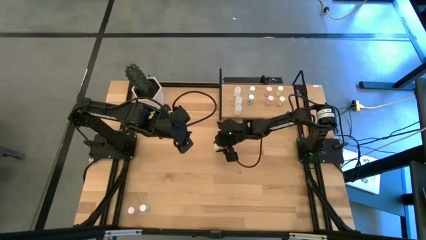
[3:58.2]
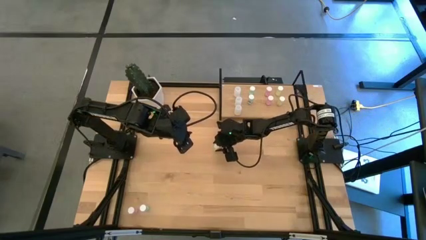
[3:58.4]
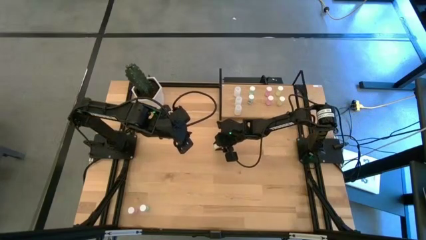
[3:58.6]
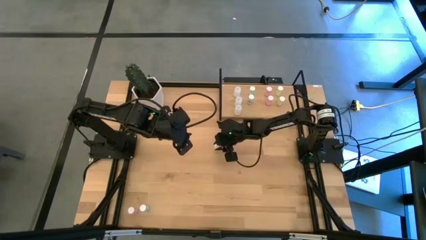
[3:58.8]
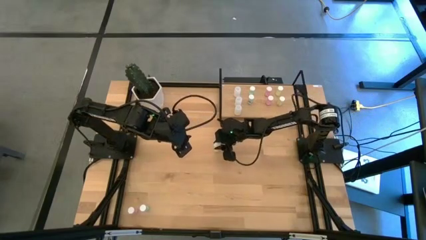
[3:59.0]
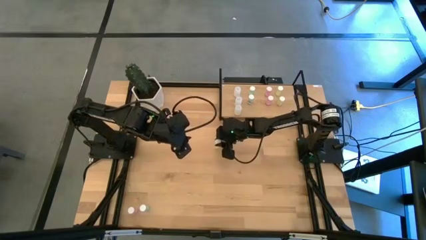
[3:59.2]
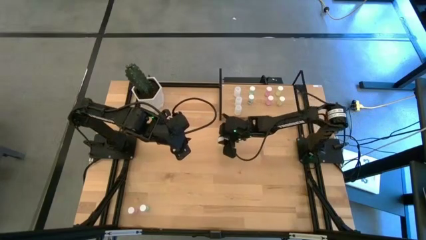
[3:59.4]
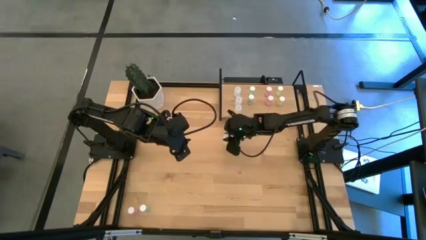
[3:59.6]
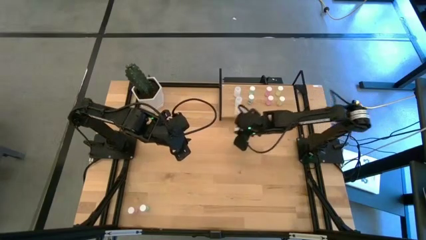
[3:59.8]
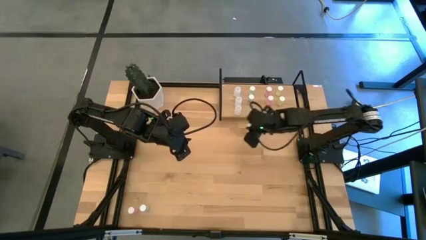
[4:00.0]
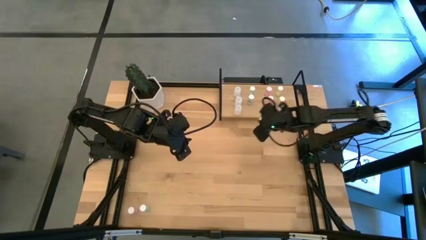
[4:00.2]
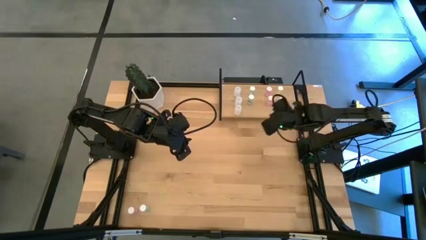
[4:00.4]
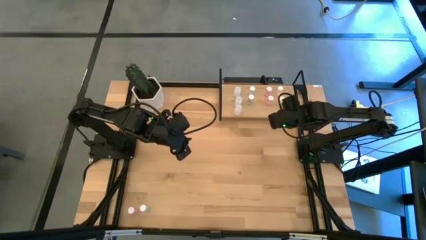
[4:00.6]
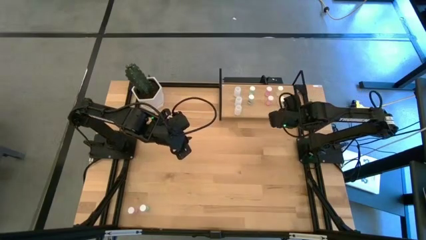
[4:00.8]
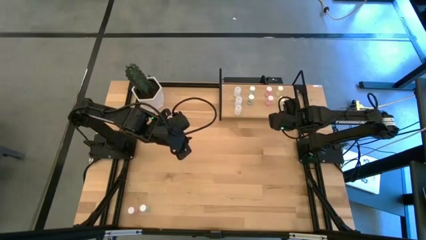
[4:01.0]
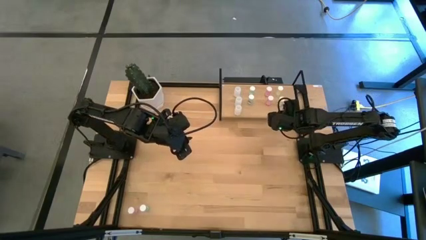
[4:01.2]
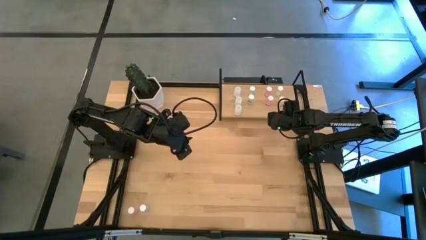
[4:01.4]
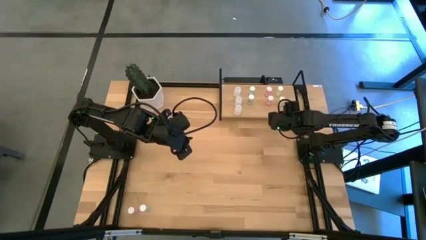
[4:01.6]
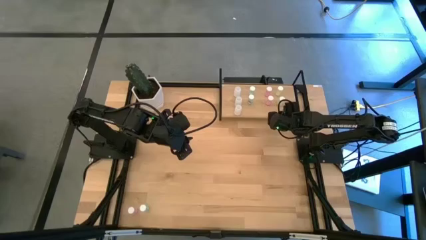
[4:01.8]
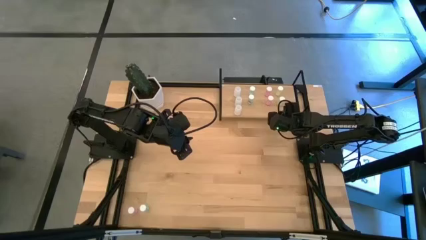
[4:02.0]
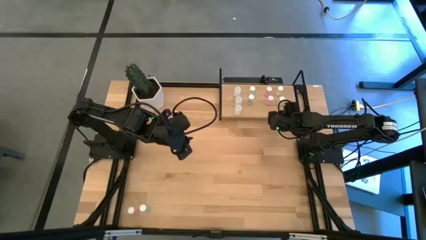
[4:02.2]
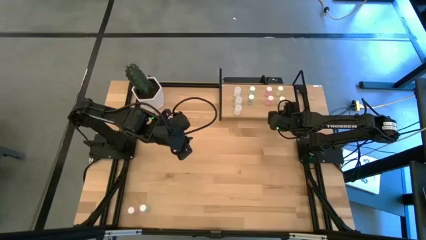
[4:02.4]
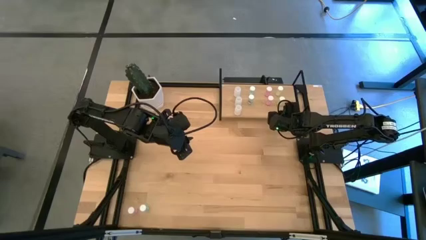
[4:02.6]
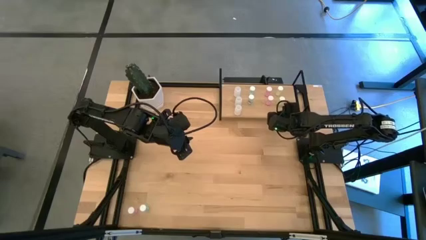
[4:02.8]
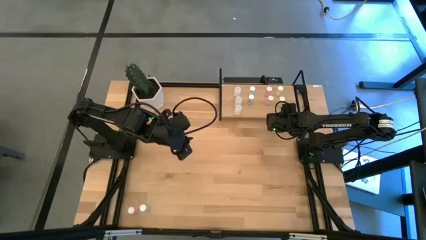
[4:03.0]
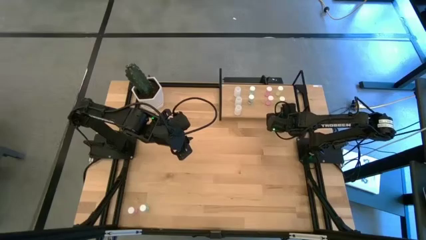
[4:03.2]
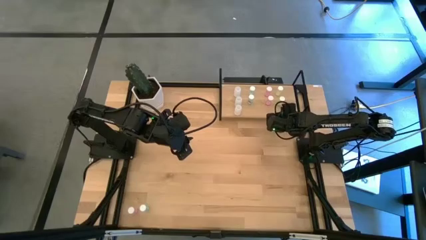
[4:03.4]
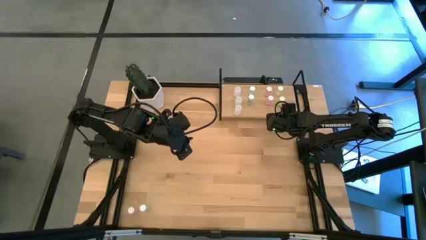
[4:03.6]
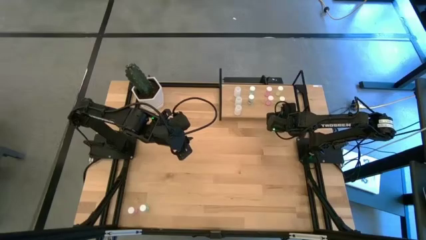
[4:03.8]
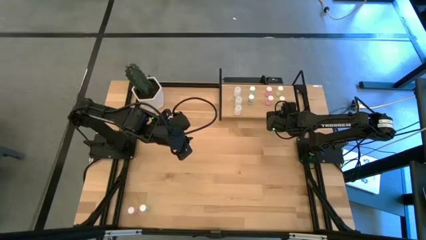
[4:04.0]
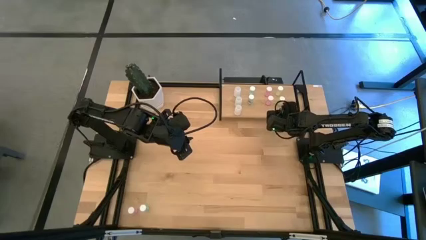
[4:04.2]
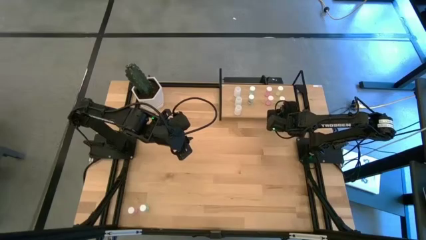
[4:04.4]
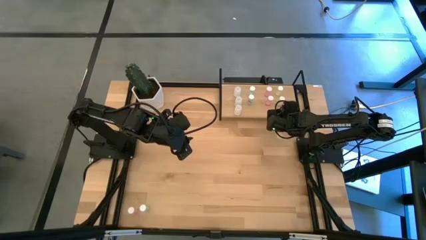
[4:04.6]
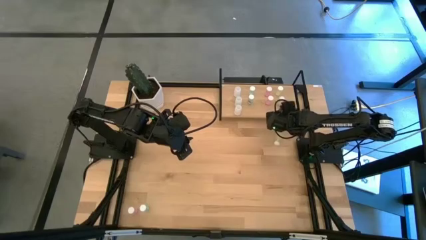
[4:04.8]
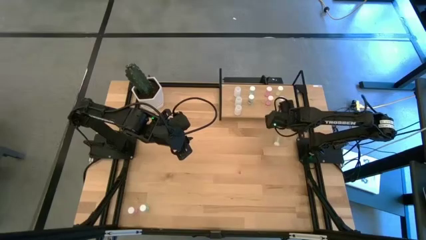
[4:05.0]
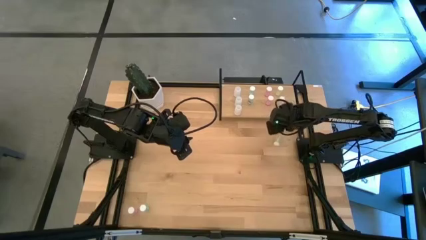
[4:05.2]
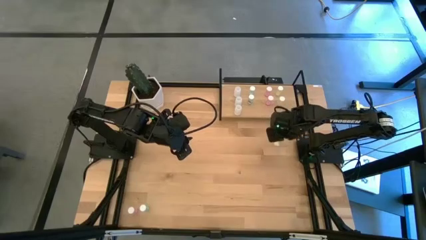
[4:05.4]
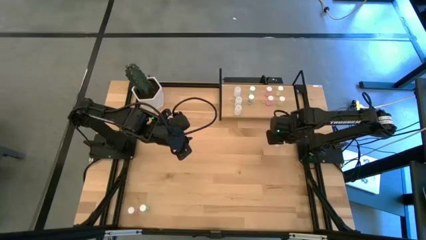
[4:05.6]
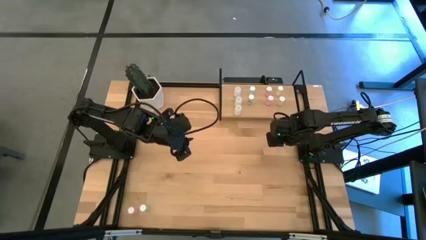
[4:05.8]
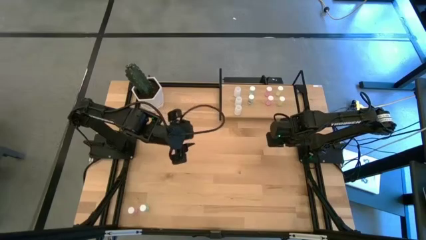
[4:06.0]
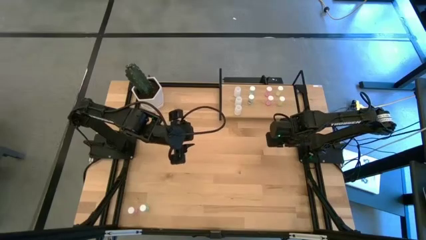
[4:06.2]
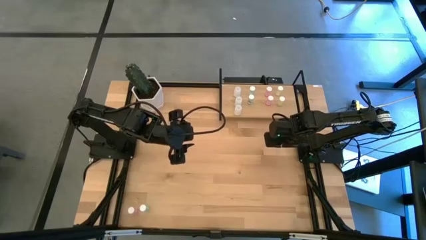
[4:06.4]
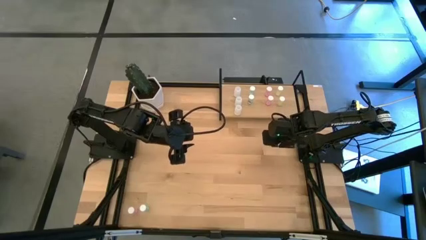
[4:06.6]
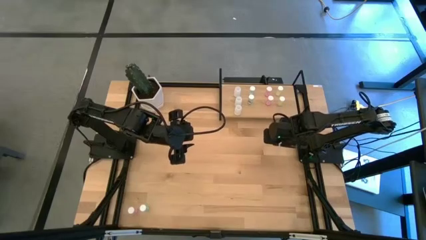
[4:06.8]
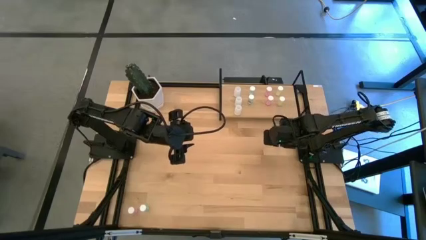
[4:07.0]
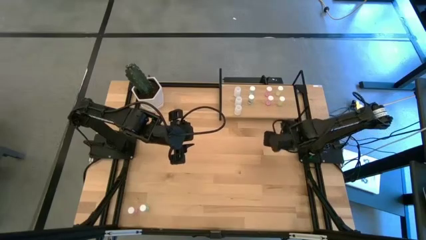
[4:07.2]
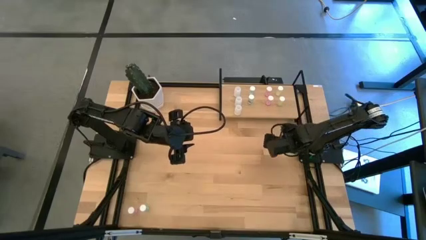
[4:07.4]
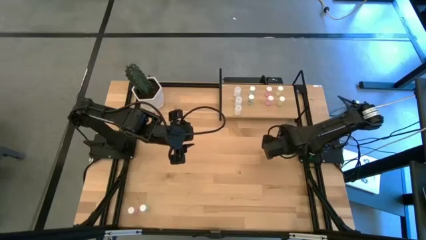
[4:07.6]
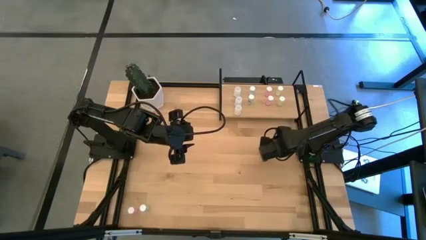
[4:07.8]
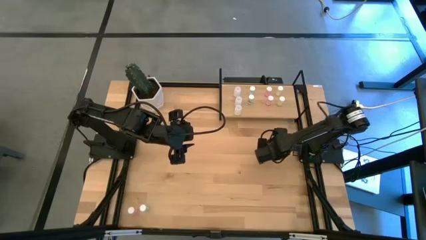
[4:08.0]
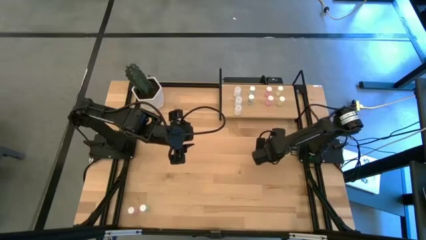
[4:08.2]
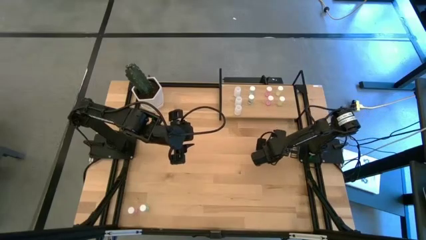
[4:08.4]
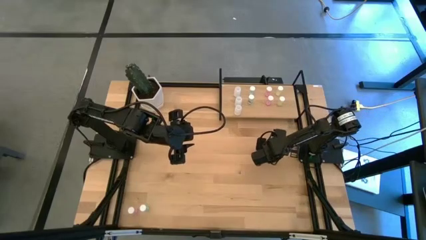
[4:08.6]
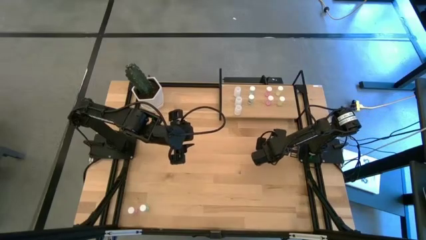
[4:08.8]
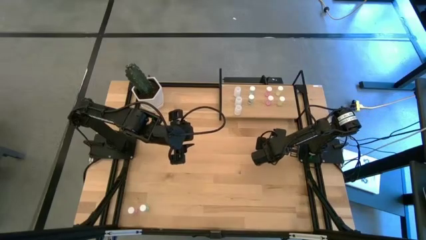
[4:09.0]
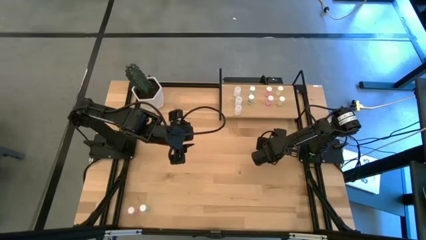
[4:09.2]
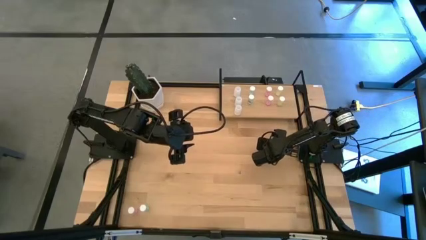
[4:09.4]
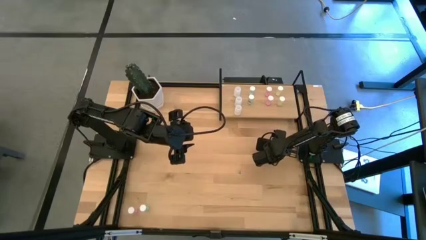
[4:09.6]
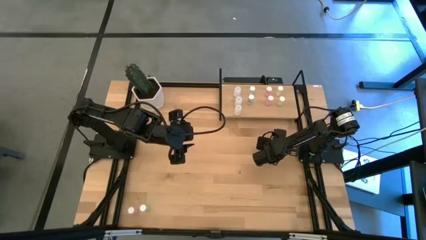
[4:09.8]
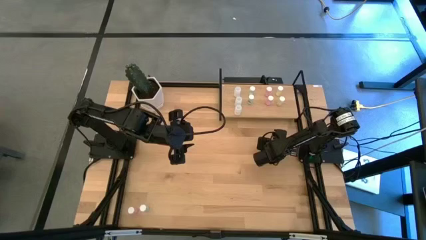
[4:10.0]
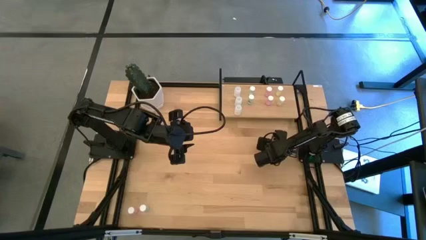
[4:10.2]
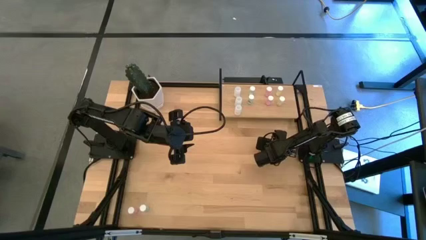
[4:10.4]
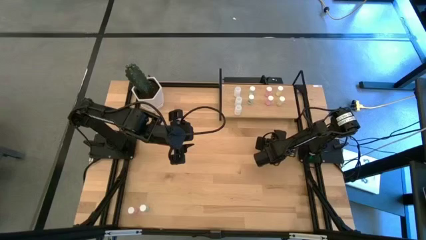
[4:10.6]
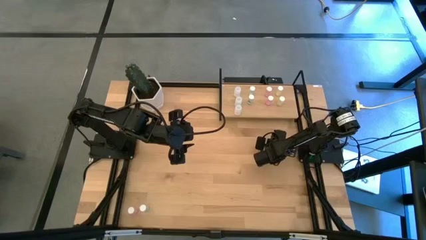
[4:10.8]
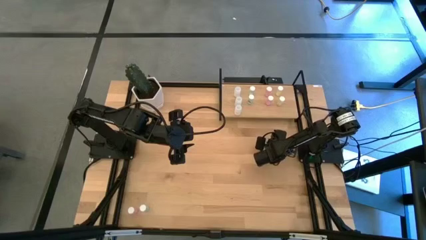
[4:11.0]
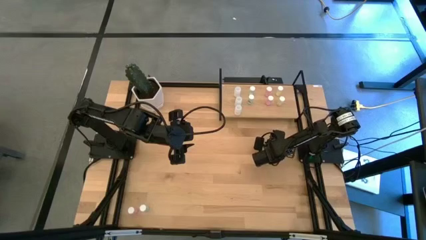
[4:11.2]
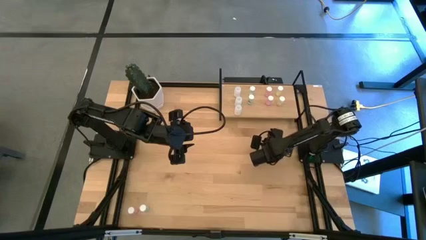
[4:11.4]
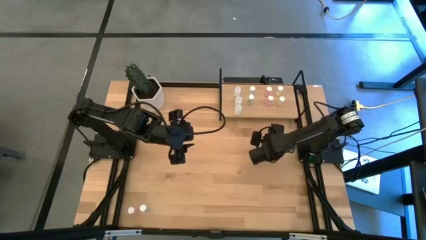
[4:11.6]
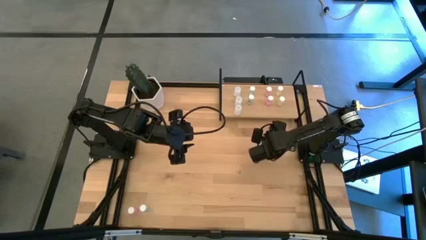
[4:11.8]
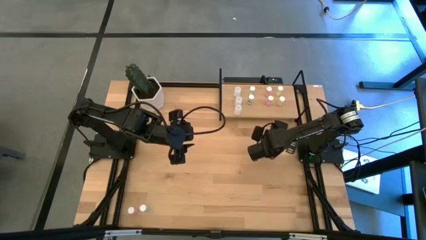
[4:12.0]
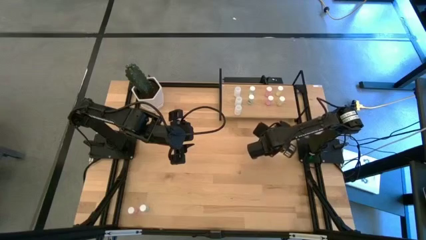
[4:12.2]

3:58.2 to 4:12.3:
Task: Pick and place medicine bottles onto shelf by color
Put the yellow pill bottle on the shelf aligned with the other yellow pill bottles

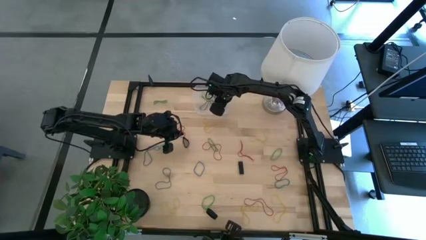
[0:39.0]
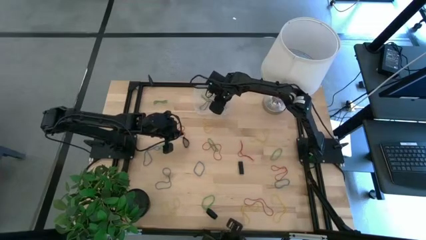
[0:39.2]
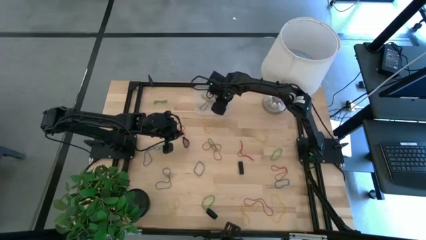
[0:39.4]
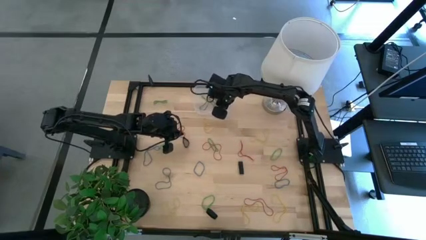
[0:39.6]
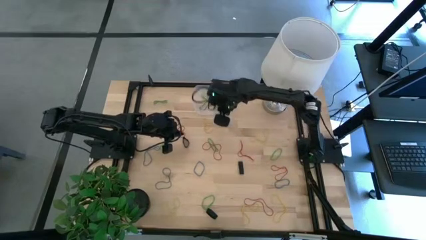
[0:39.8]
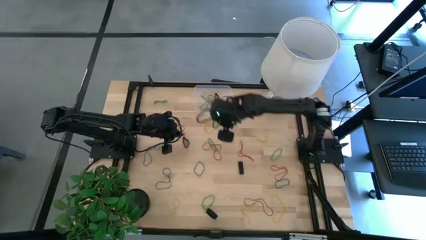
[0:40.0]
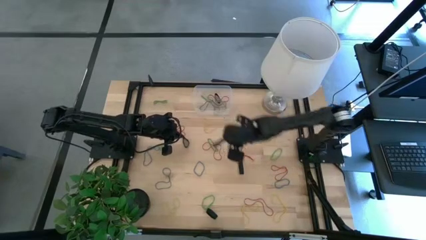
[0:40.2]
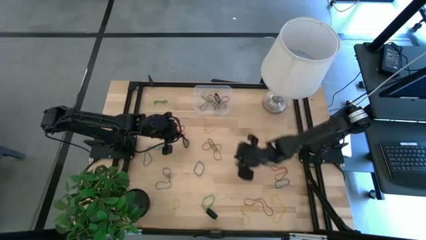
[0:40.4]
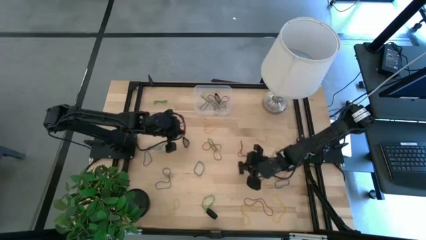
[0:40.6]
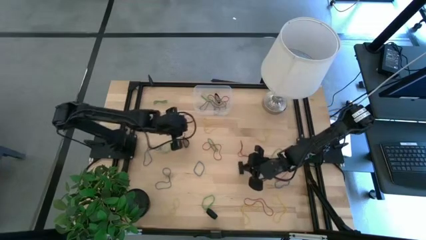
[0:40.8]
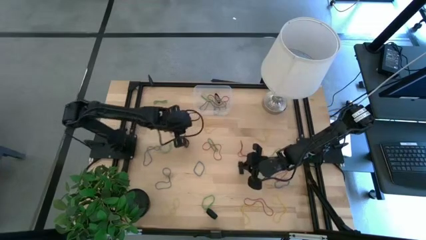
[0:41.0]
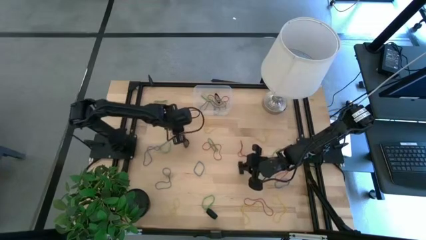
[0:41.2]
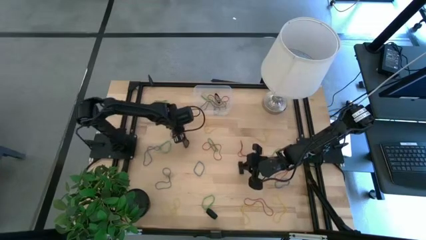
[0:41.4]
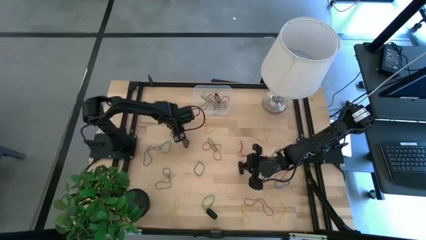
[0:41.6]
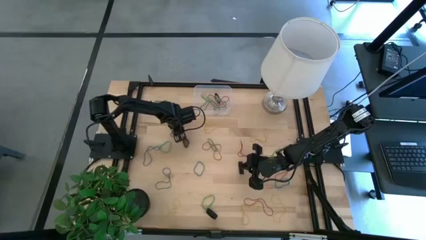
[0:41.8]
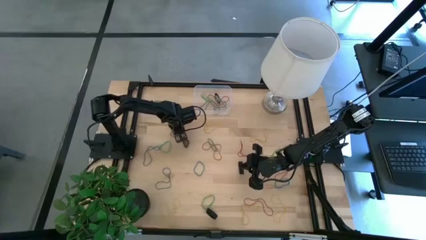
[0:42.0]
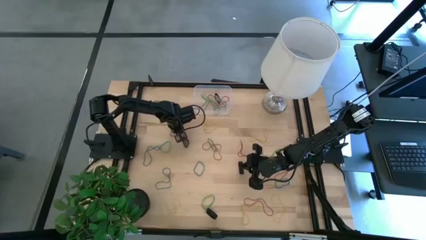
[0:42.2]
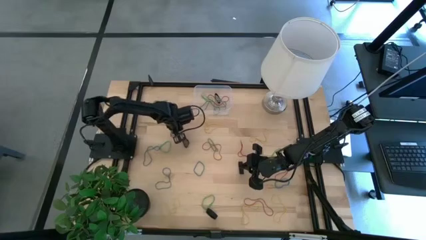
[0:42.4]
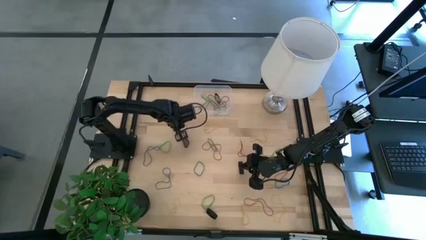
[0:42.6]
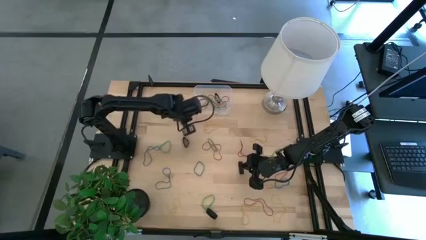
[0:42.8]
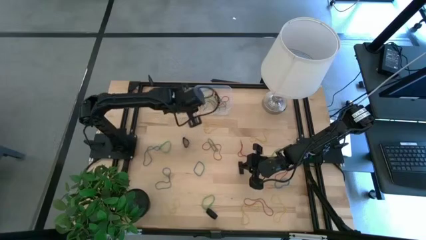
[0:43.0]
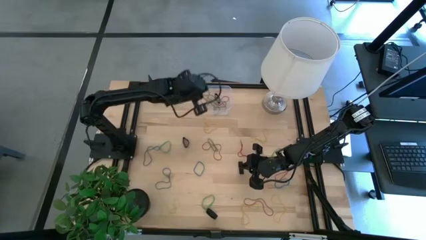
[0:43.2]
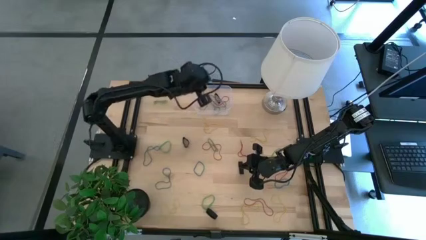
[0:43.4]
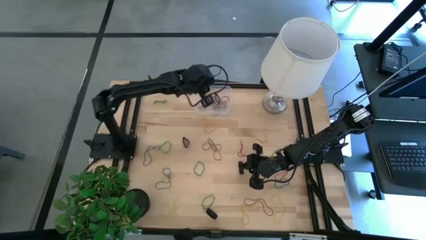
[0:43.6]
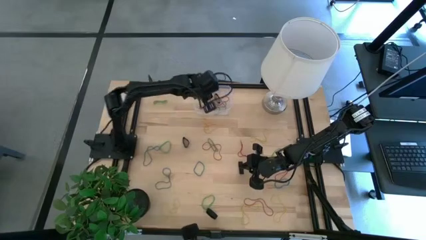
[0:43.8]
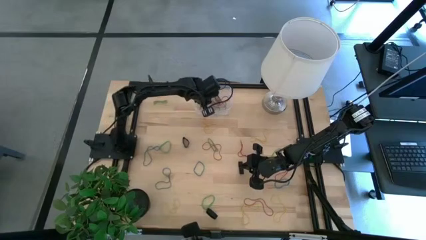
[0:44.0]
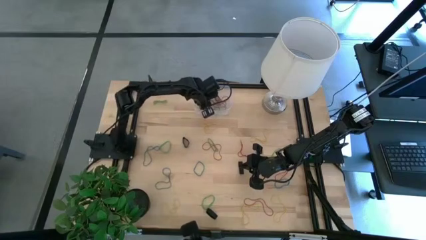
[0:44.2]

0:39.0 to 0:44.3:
Task: Pick and place rubber bands into bin
Put the red rubber band into the transparent bin
